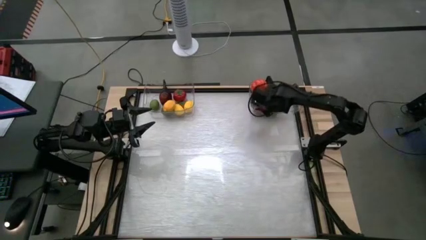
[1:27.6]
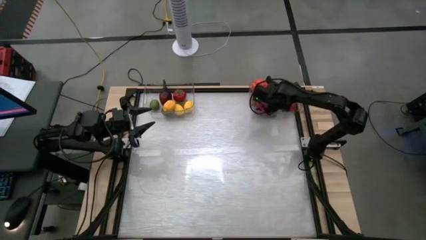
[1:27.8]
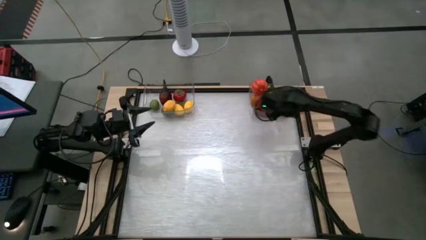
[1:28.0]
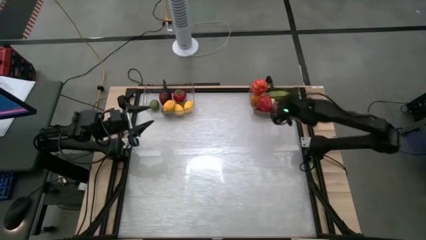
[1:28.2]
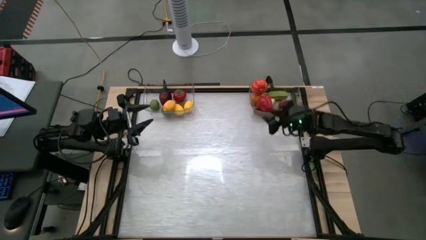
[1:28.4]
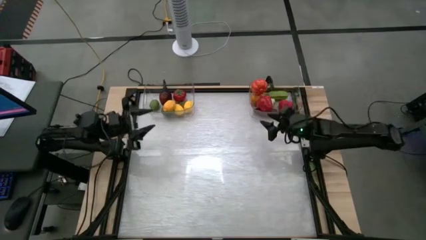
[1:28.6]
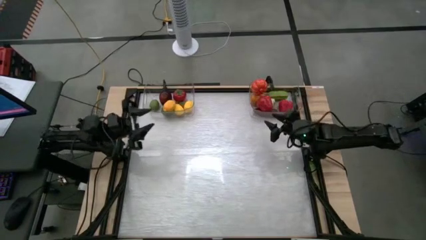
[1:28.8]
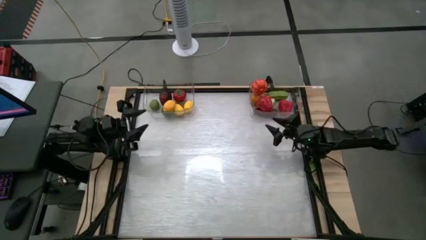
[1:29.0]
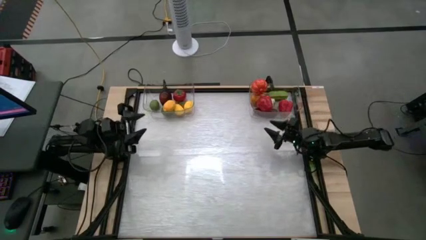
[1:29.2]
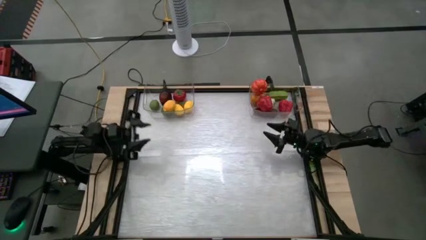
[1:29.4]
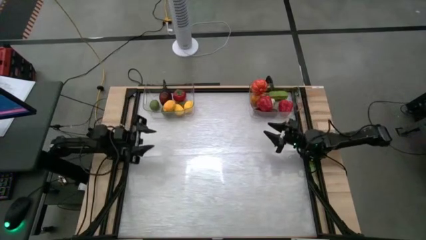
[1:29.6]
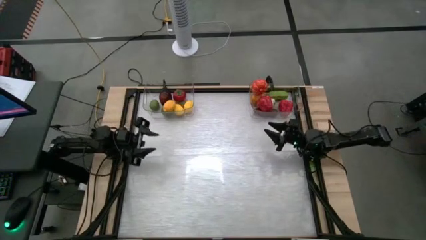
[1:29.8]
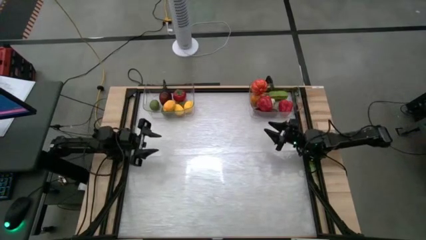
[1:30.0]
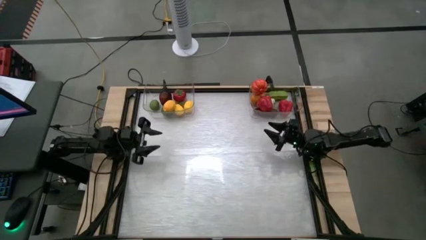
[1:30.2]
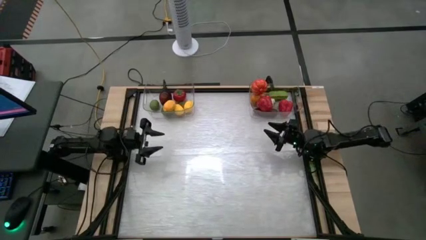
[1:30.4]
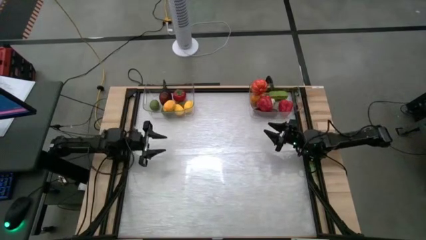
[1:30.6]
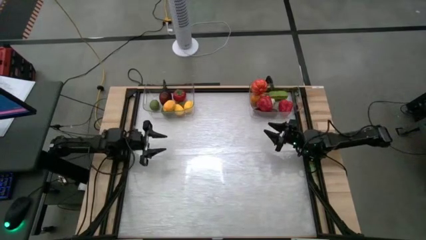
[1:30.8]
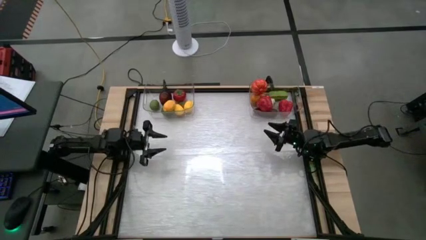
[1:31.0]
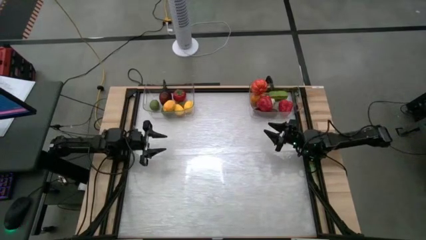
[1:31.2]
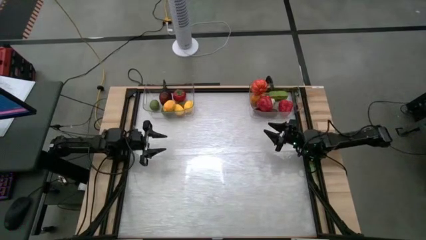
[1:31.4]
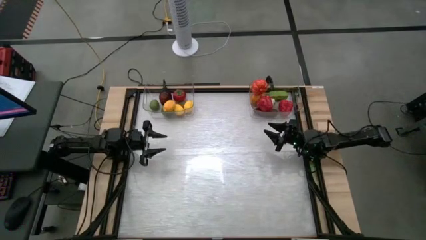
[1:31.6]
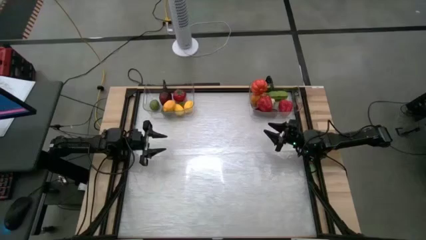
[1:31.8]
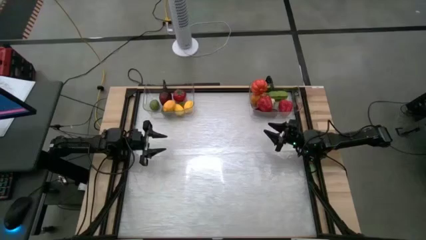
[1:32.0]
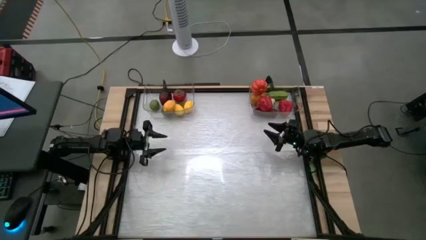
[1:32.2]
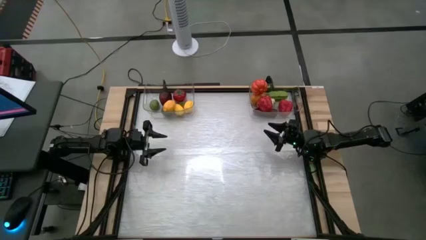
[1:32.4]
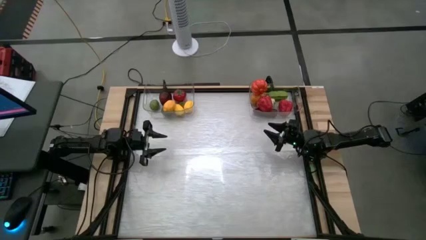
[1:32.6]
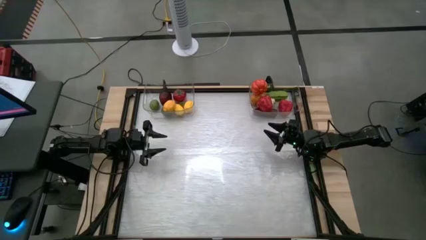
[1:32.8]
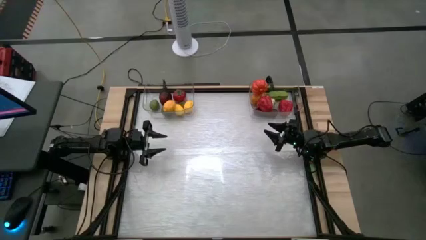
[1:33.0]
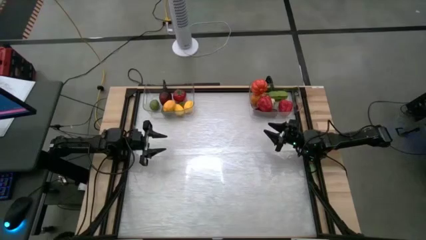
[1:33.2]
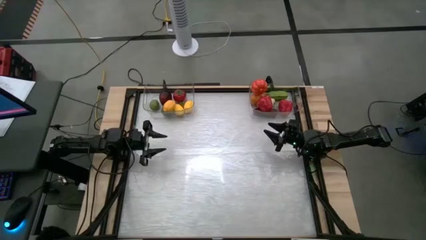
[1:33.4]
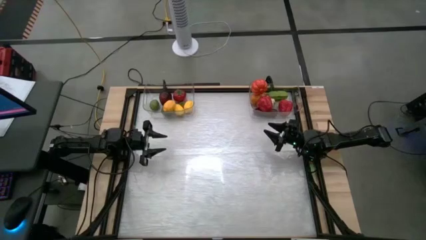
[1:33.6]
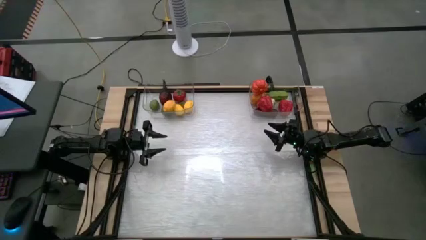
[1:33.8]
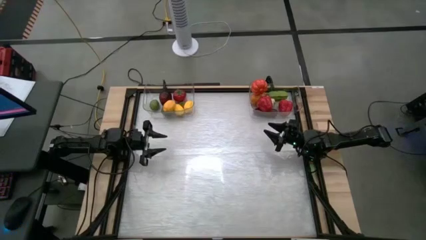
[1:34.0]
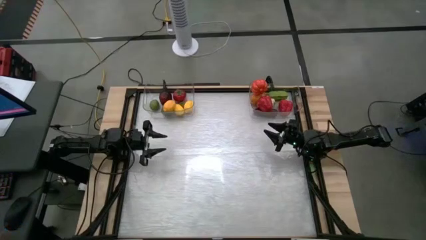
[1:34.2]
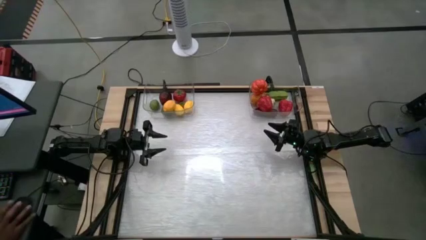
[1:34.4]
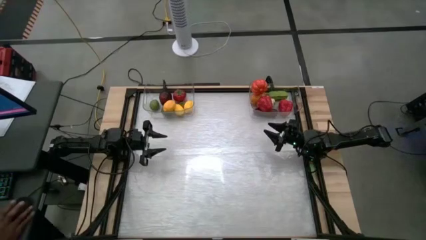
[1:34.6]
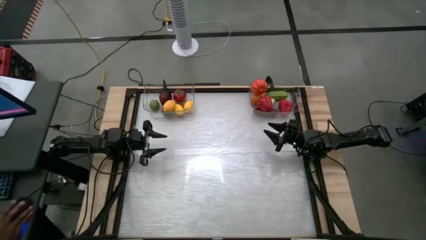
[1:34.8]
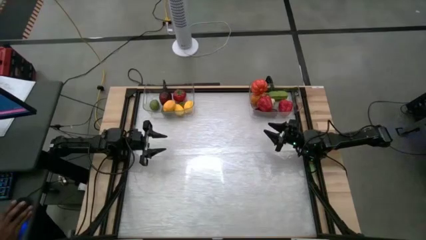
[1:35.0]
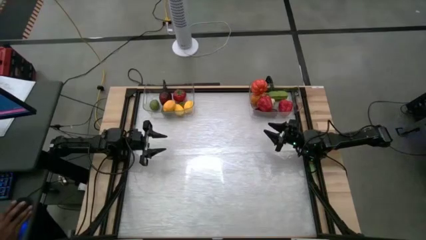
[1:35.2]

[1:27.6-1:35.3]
Task: Sort produce into baskets
Return to Home position

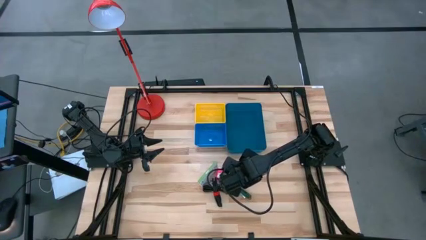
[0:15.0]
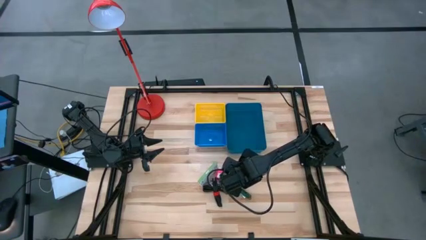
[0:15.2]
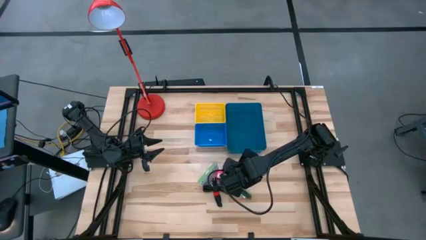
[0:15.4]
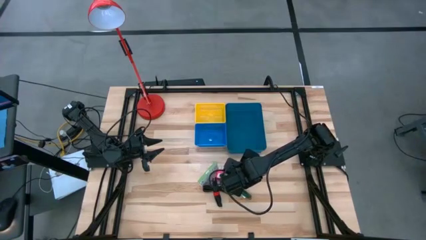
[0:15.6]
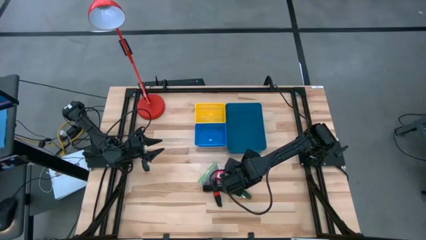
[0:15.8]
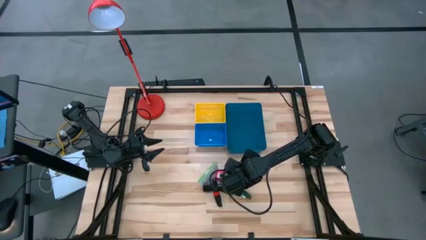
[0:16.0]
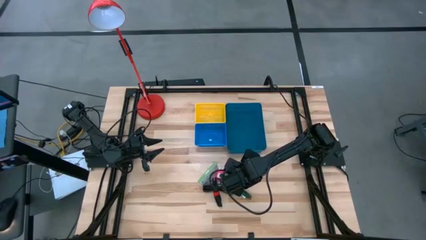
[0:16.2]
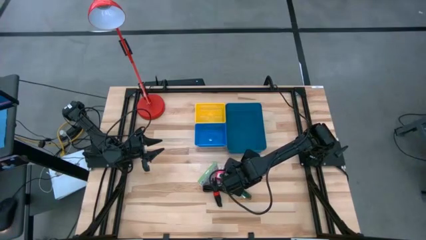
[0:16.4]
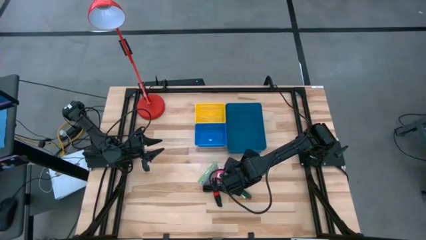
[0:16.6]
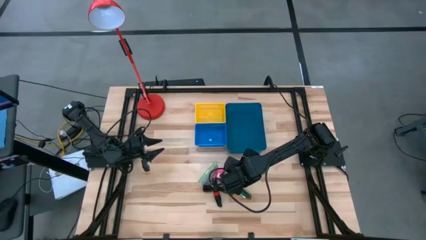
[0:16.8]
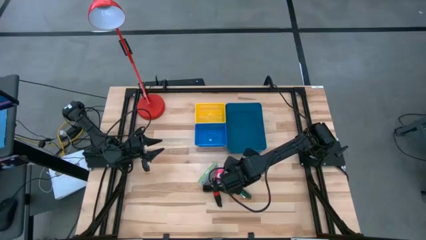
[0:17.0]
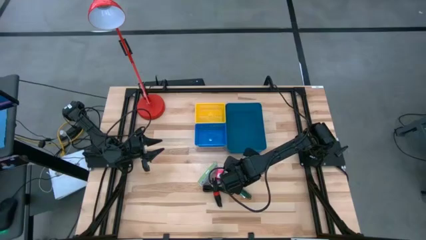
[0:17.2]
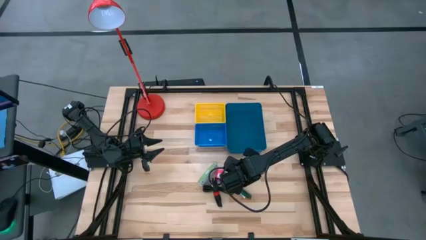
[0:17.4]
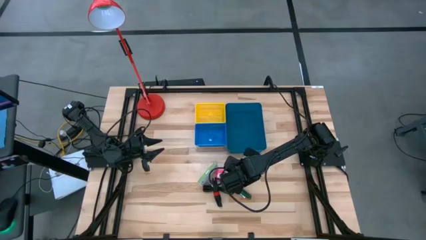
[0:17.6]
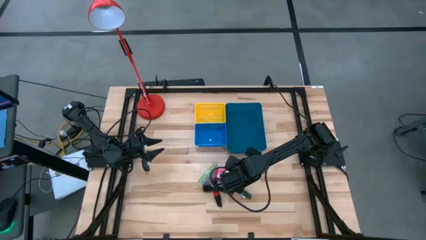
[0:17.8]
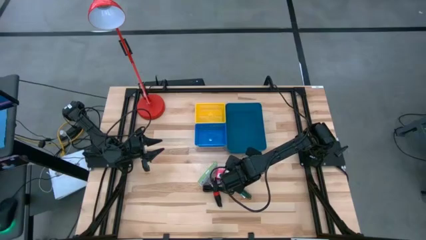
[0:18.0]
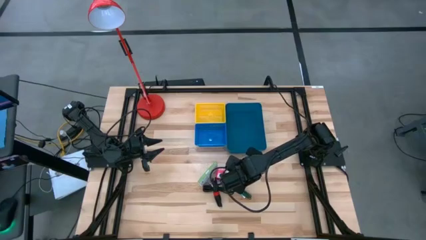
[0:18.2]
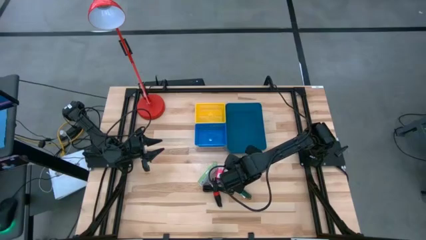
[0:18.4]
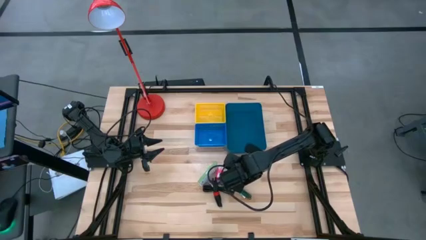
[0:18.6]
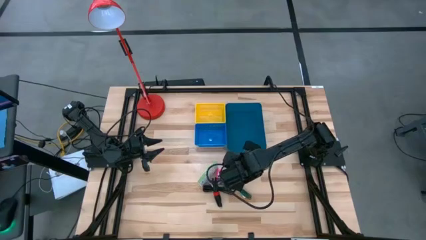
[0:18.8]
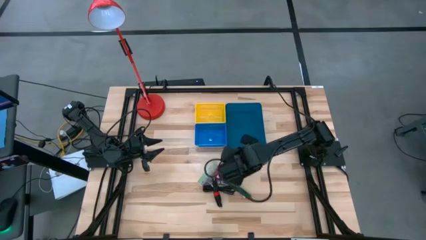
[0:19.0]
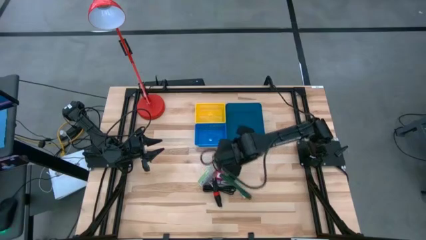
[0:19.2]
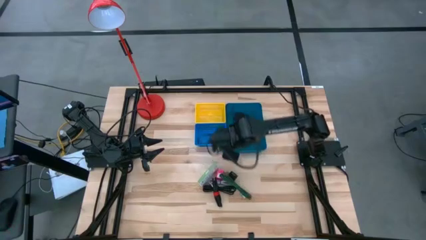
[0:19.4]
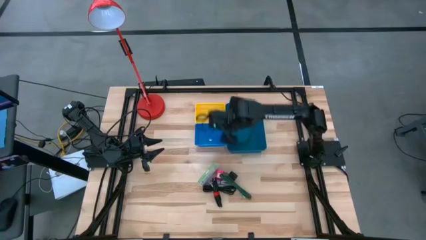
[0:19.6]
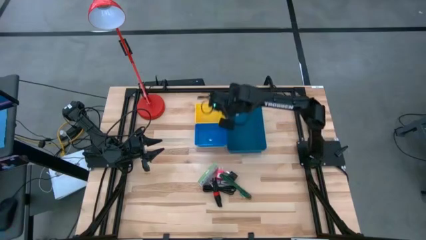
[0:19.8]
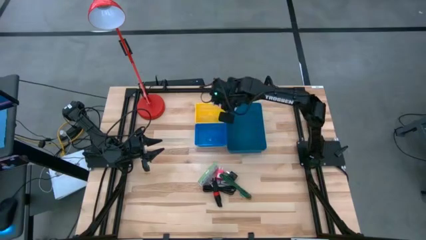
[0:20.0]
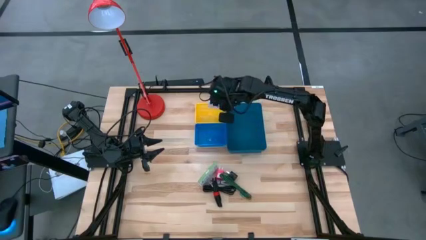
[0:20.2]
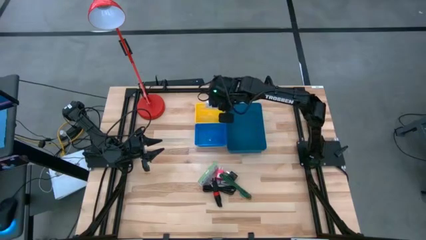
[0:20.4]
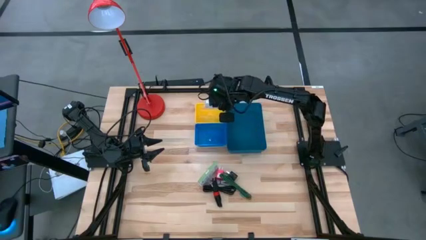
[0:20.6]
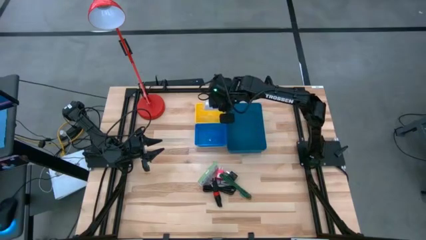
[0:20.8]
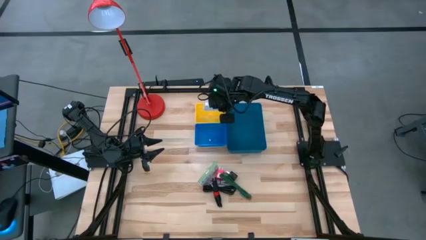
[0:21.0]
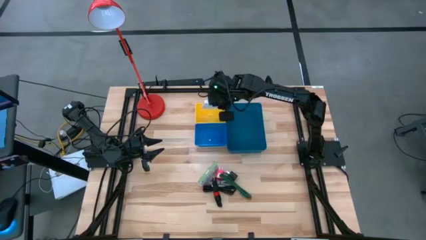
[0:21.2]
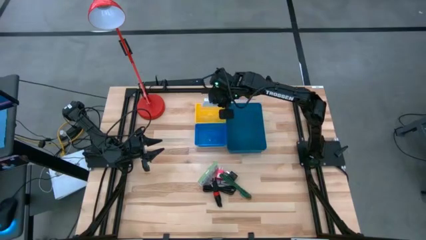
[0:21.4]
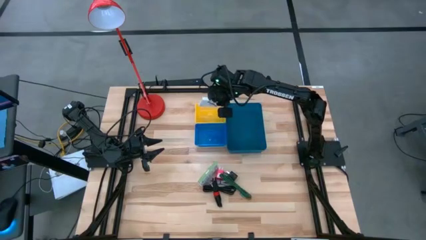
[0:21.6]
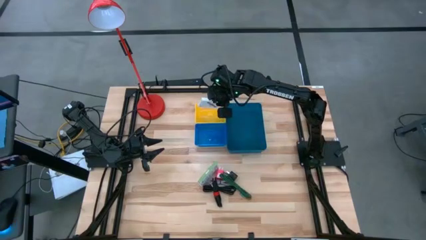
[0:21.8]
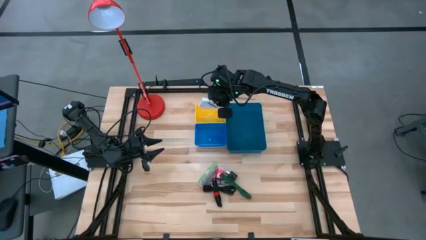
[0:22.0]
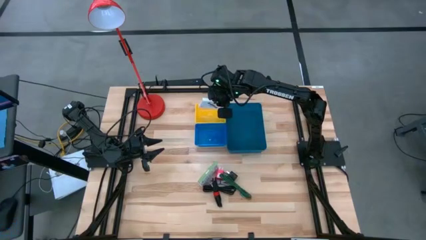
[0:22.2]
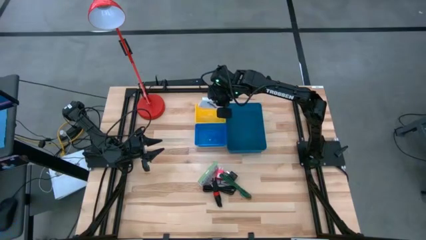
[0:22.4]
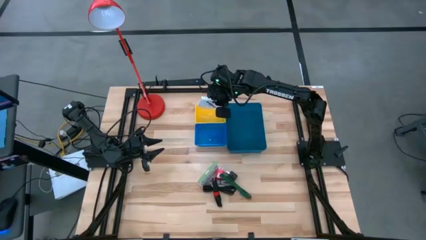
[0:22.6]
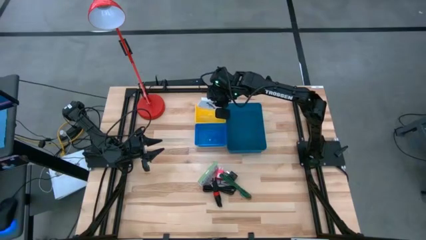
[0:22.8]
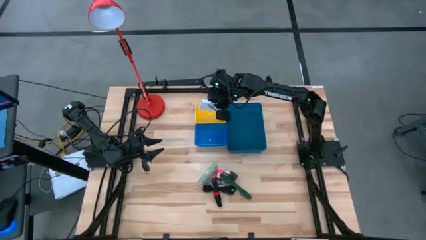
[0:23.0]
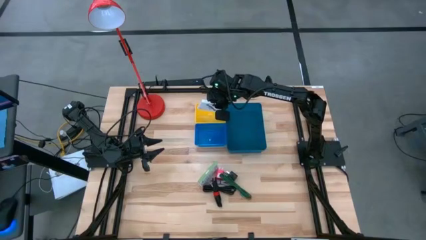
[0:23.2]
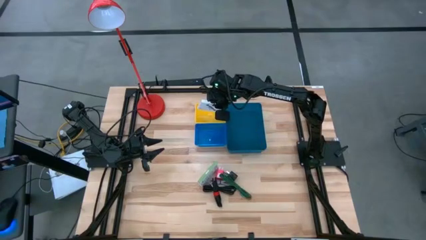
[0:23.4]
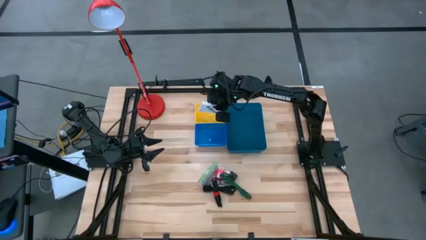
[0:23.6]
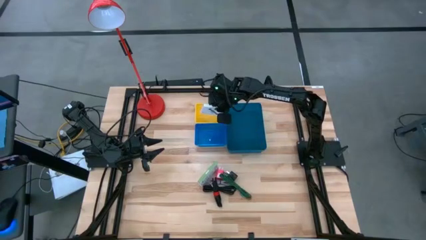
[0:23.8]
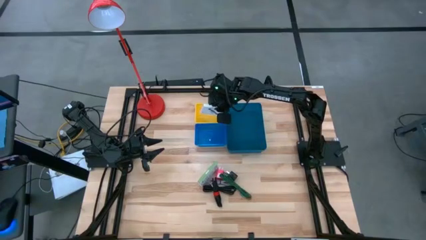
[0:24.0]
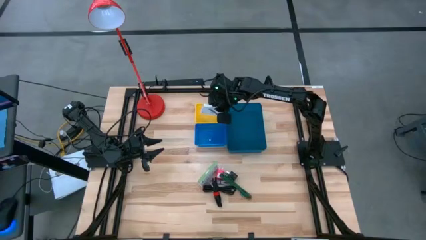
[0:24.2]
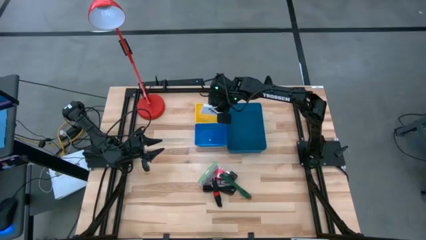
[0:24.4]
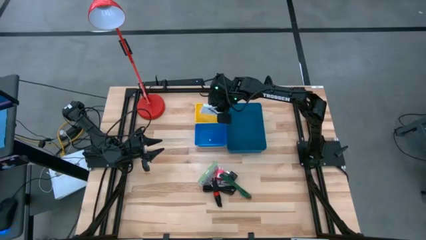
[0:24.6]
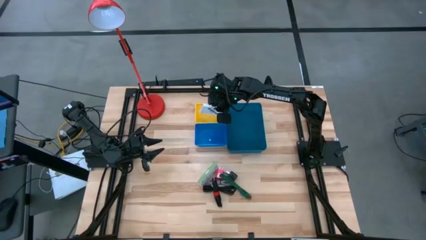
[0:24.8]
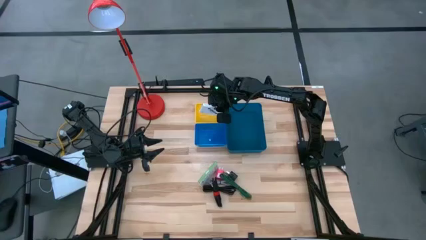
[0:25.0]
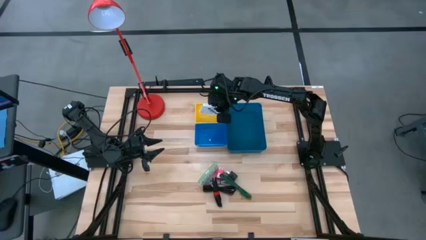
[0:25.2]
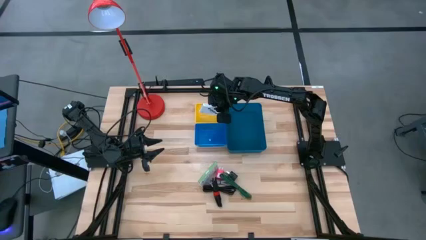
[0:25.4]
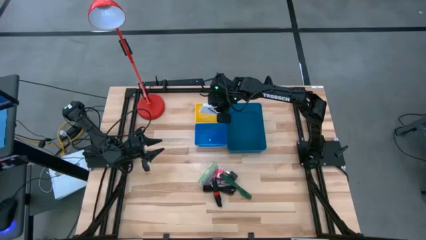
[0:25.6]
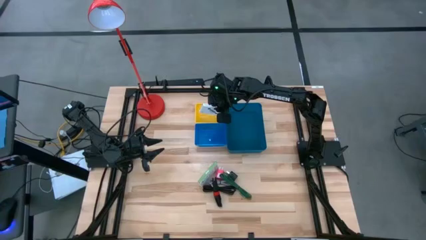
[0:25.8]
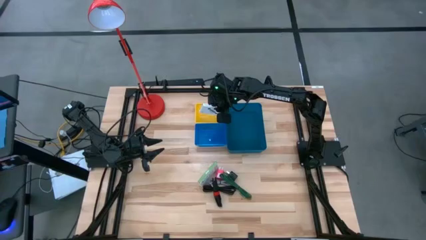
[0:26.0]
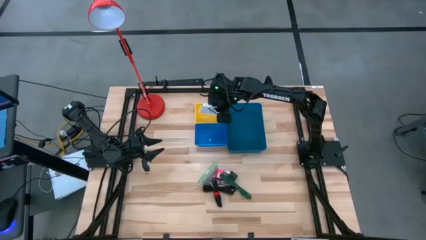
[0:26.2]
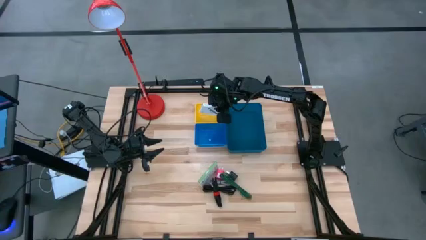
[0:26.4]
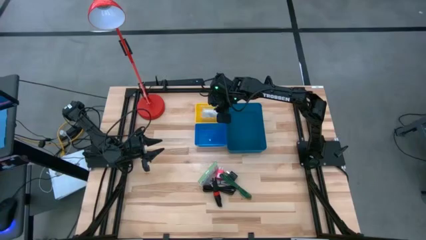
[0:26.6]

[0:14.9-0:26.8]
Task: Pick and place items into bin
Put the right card reader box into the yellow bin
